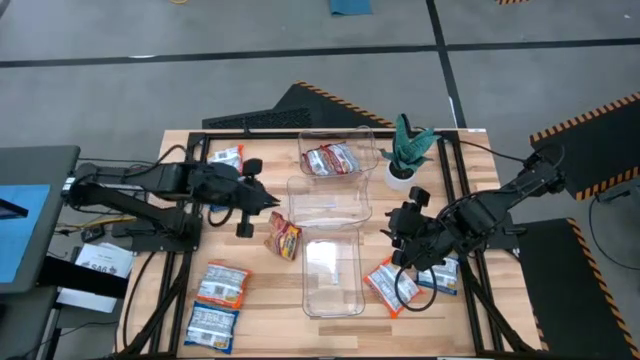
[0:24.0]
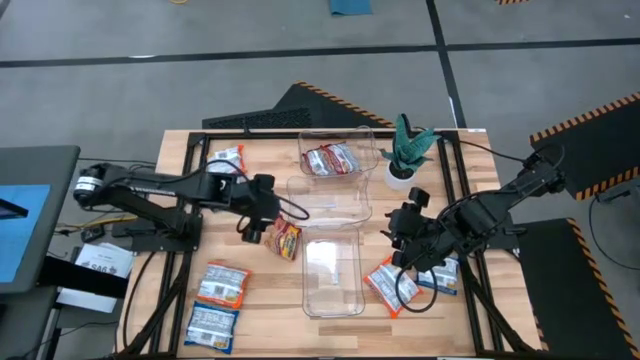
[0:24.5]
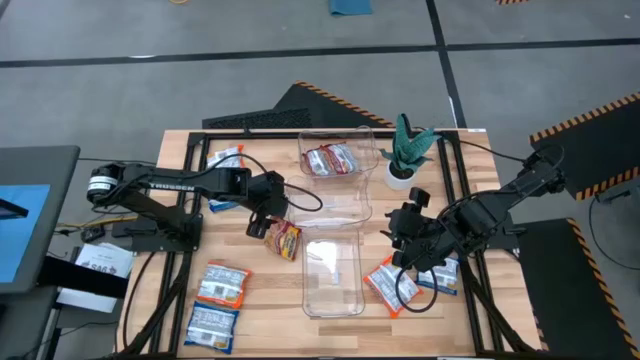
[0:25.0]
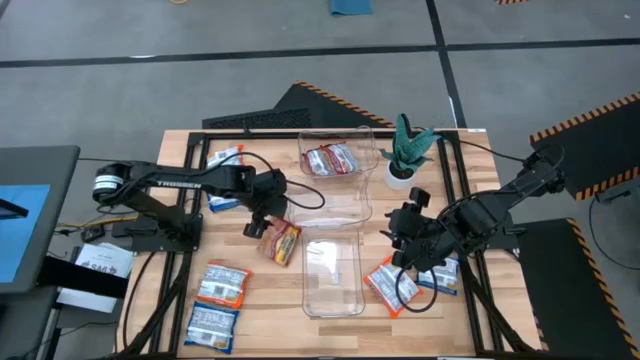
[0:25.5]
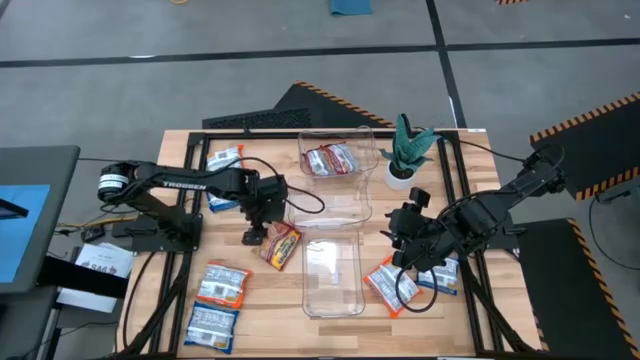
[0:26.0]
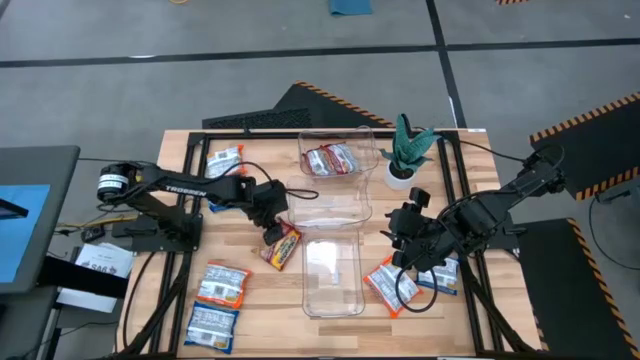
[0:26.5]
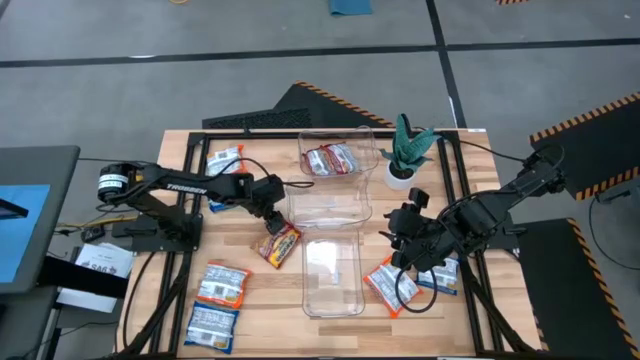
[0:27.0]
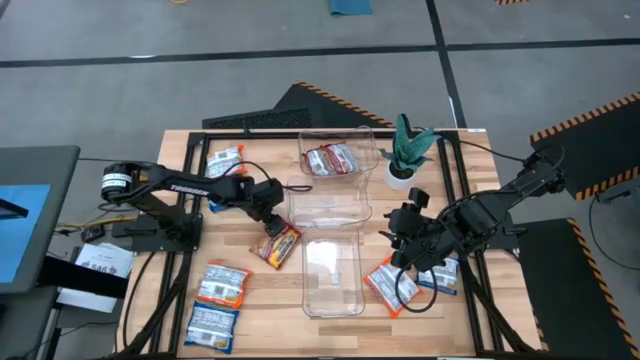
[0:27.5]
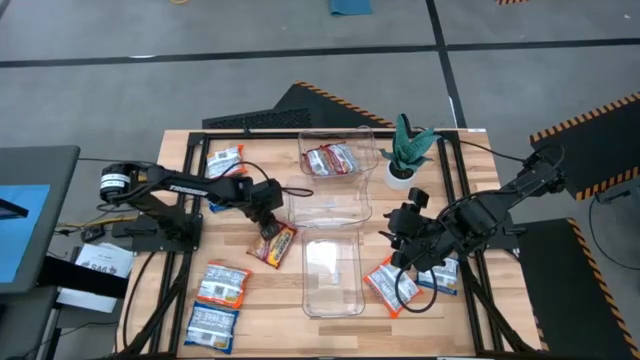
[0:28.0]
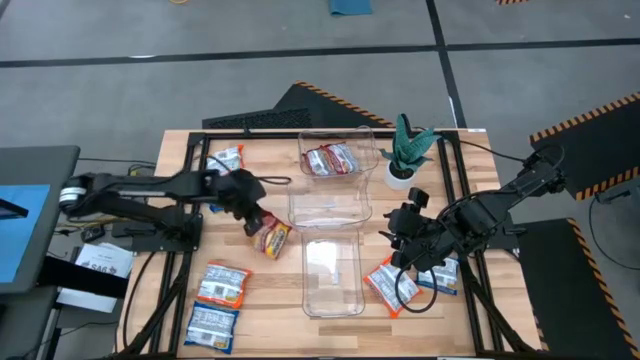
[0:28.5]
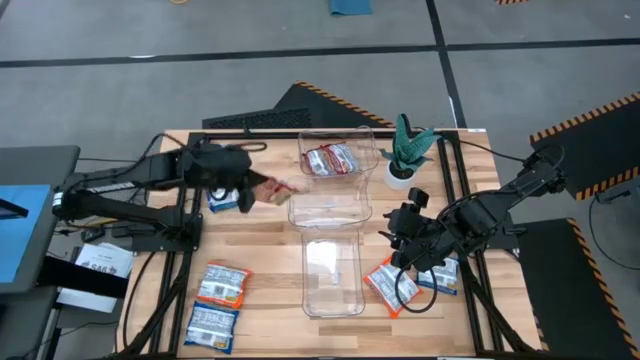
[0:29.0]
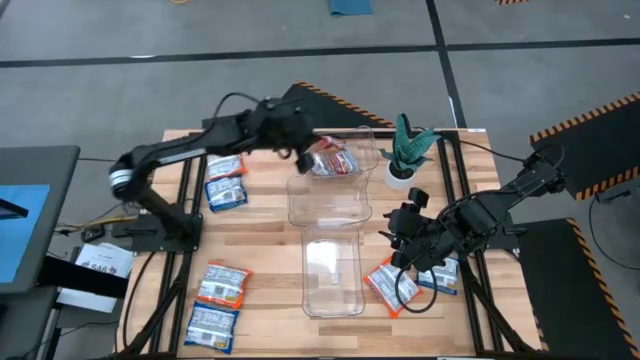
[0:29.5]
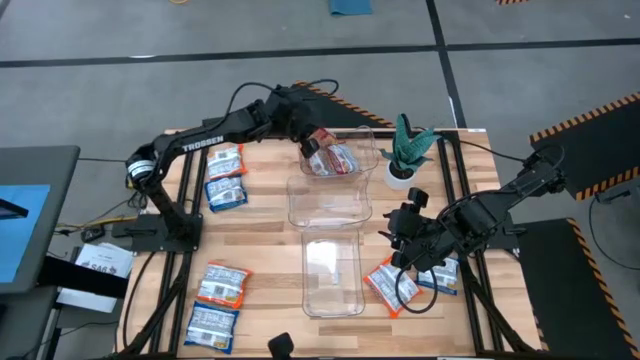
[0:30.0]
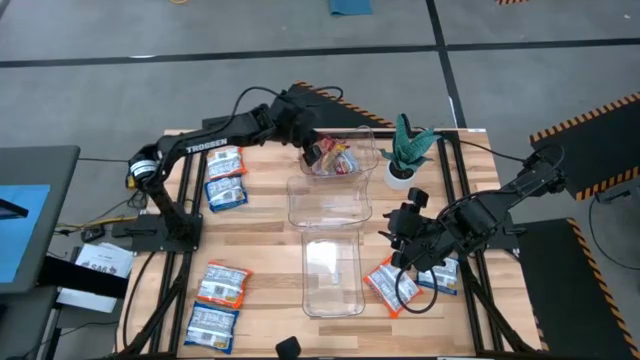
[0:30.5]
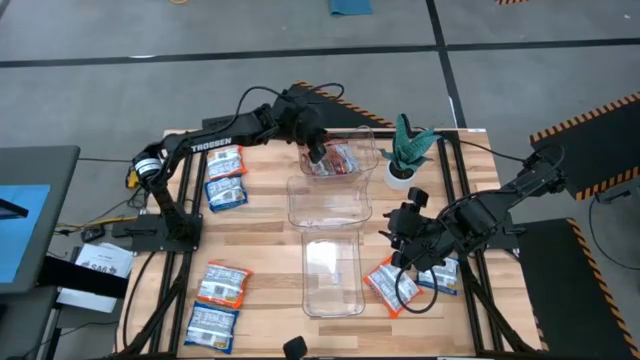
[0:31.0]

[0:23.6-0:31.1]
Task: Sort Maruchan noodles
Put the red noodle pack into the top transparent bin

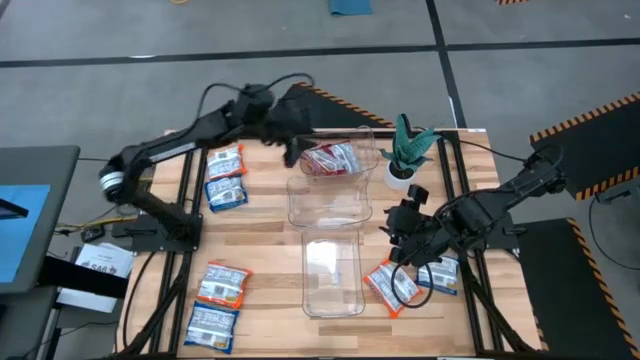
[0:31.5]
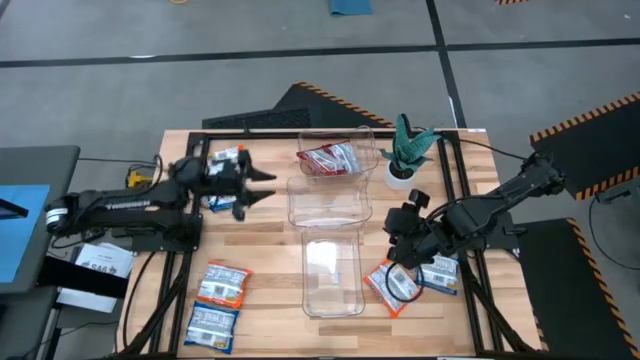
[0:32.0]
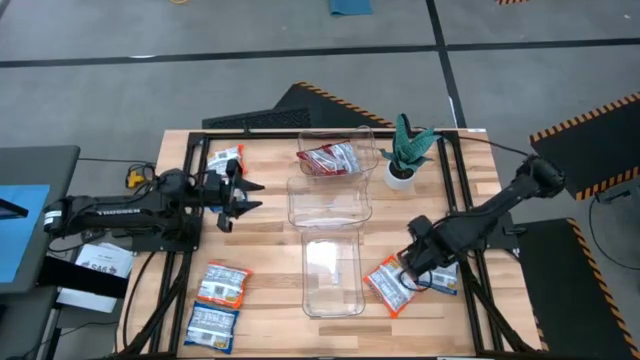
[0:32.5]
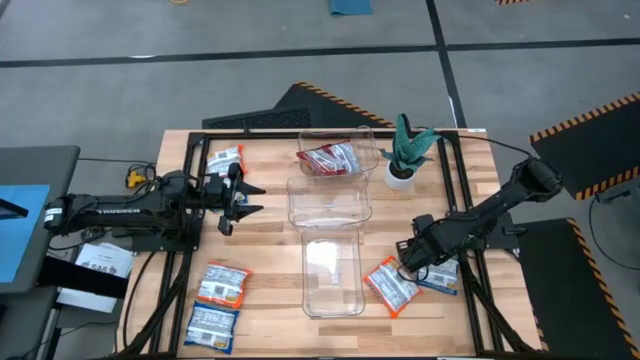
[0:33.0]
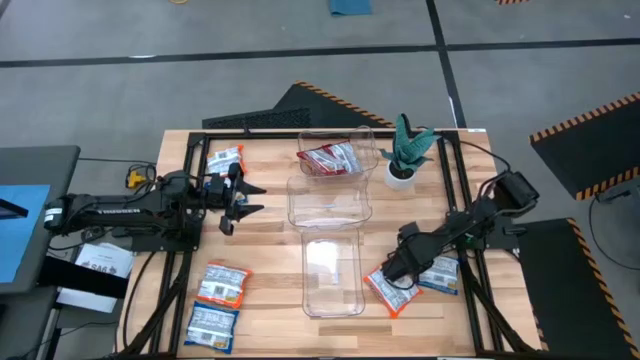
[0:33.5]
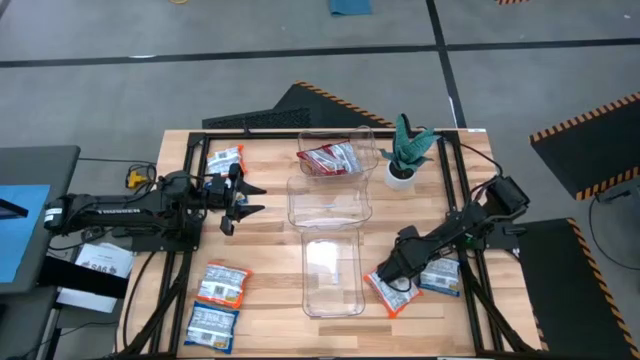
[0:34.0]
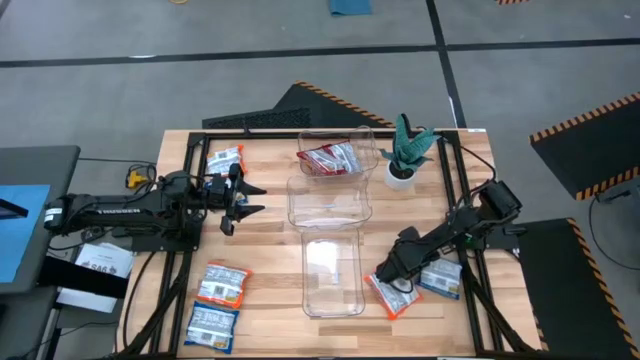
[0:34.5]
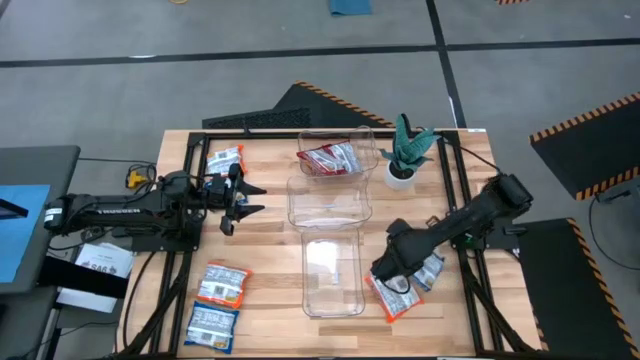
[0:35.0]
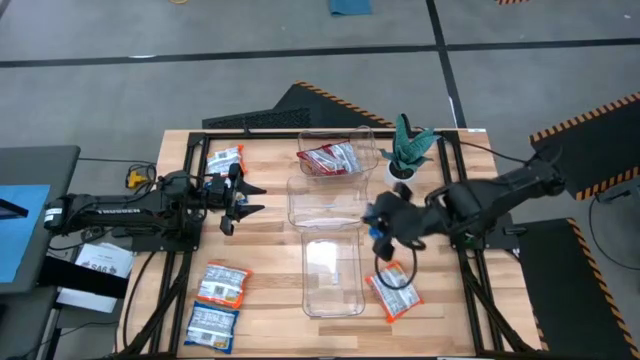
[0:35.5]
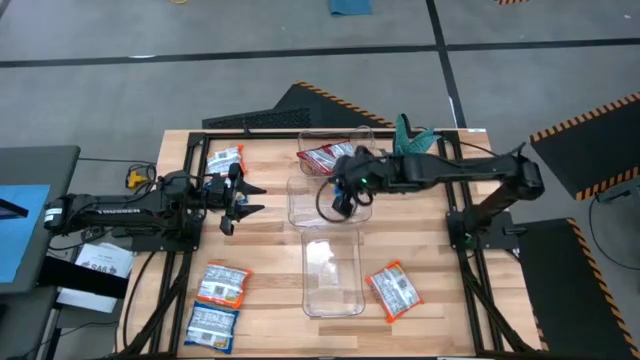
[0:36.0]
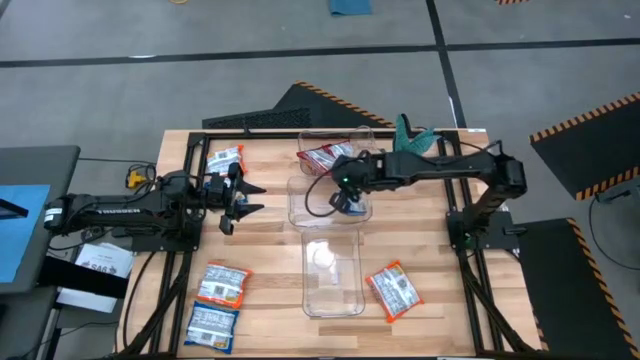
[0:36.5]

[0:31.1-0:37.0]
Put the bottom right blue noodle pack into the middle transparent bin

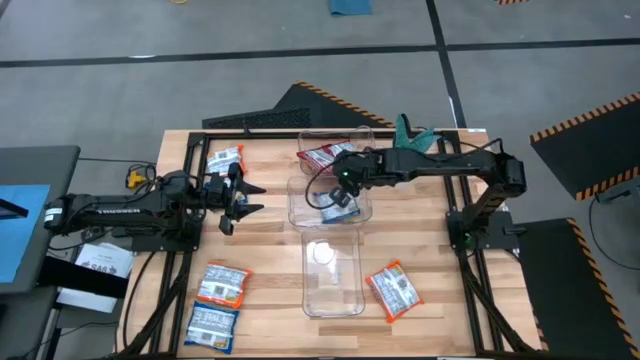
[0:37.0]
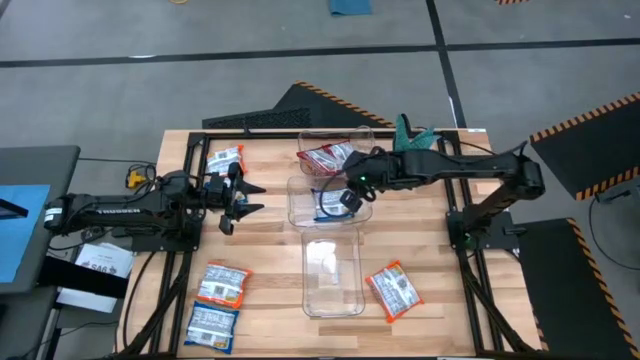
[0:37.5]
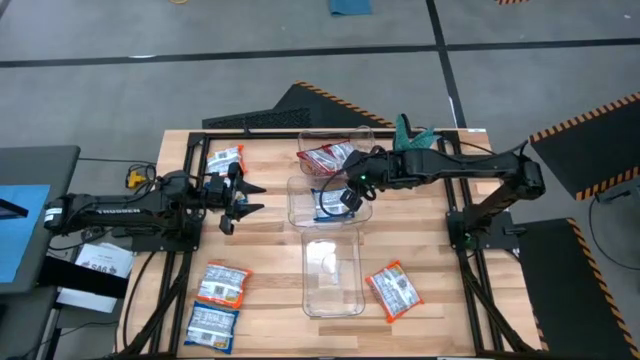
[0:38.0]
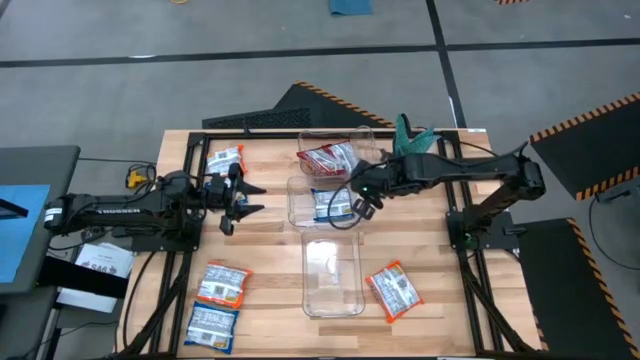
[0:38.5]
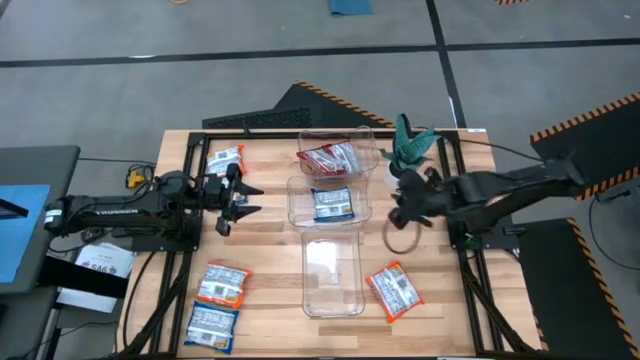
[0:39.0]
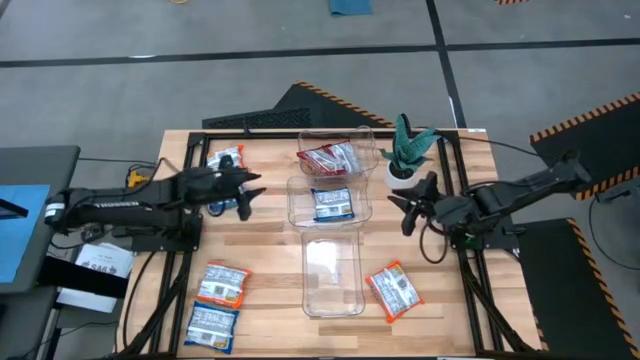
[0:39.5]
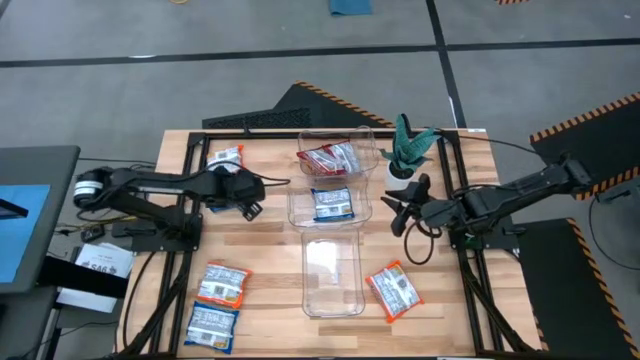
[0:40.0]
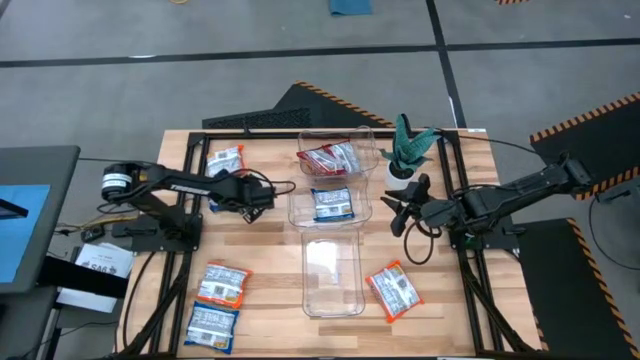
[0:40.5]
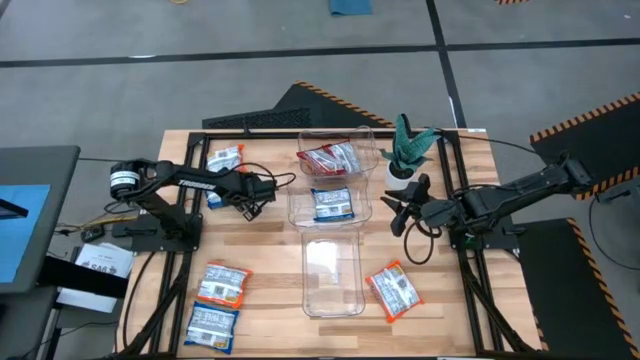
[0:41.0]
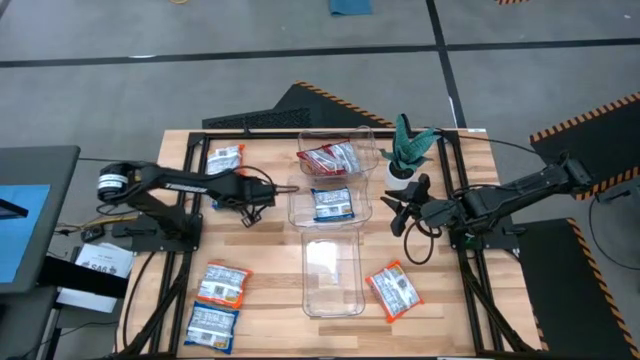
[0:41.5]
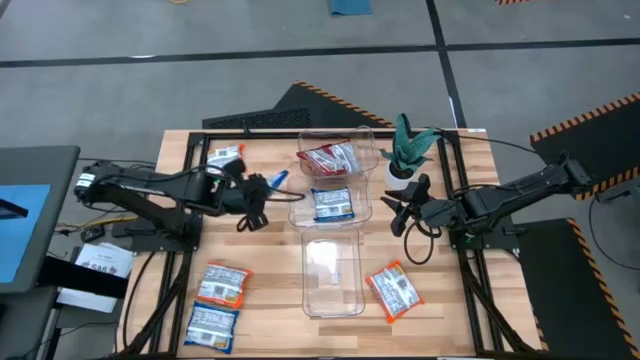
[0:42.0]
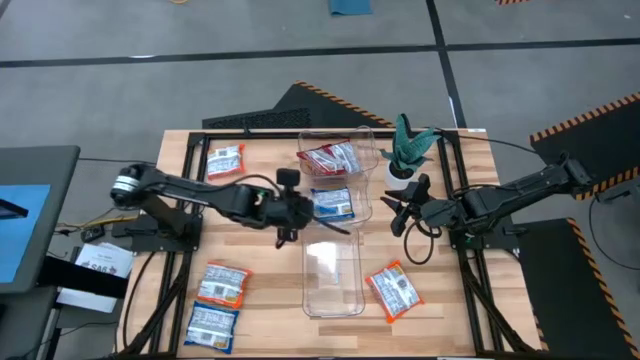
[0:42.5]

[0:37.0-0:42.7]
Put the top blue noodle pack into the middle transparent bin

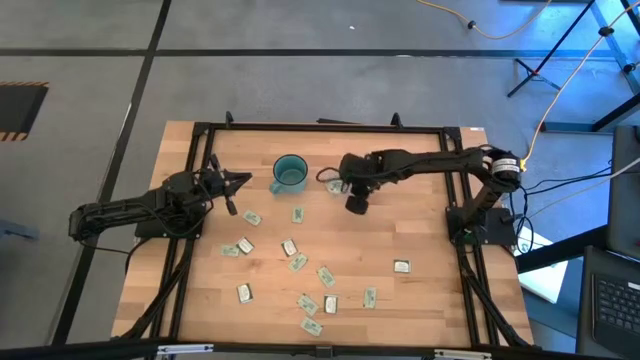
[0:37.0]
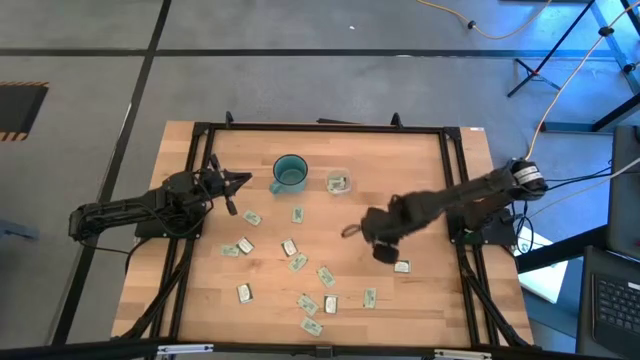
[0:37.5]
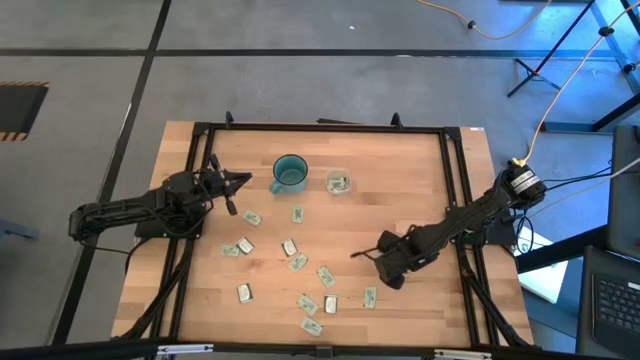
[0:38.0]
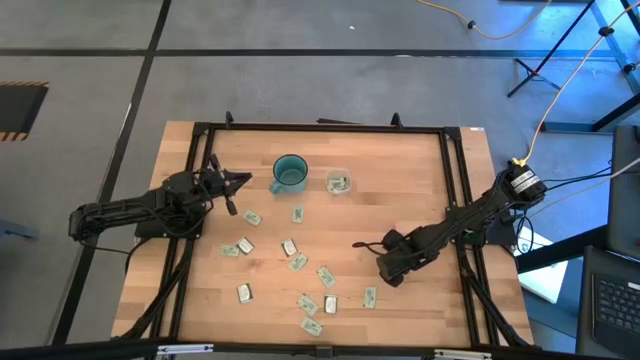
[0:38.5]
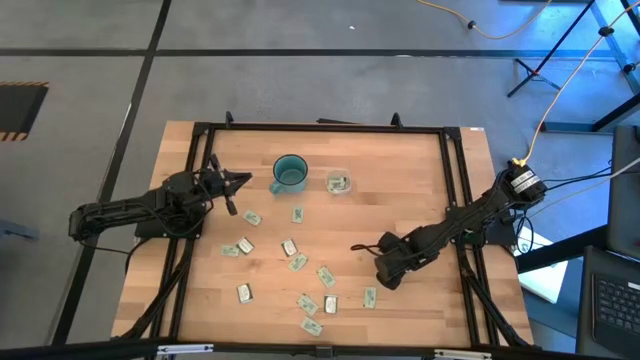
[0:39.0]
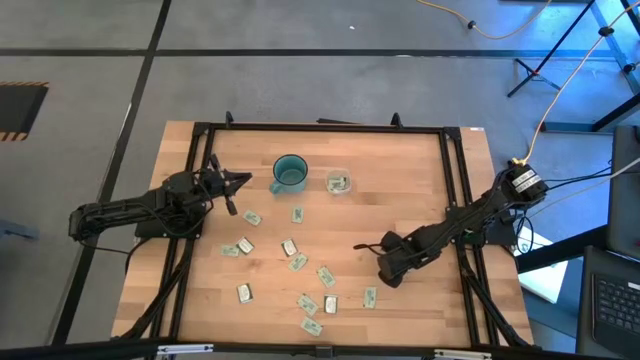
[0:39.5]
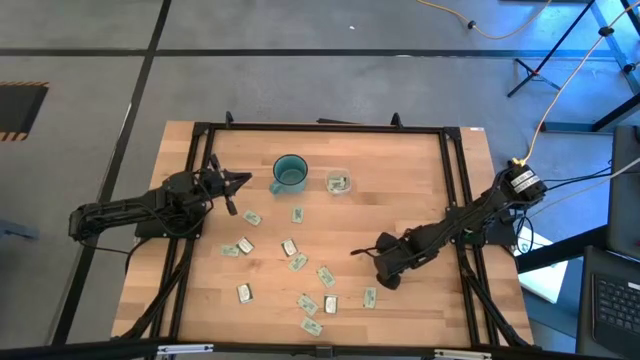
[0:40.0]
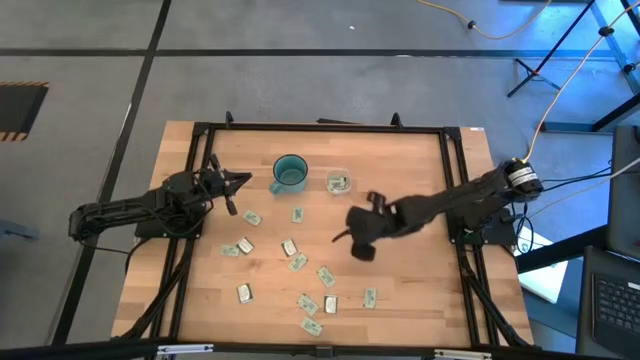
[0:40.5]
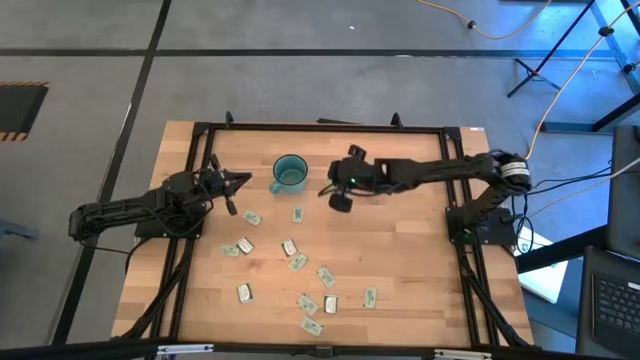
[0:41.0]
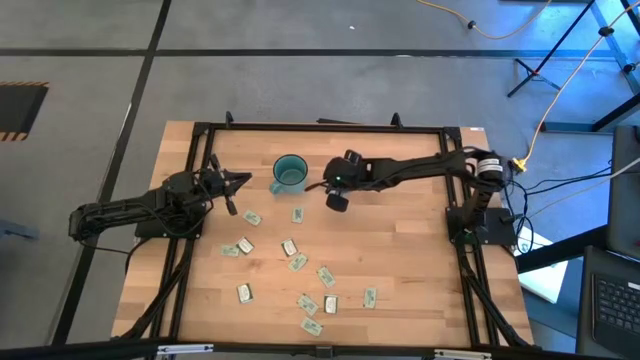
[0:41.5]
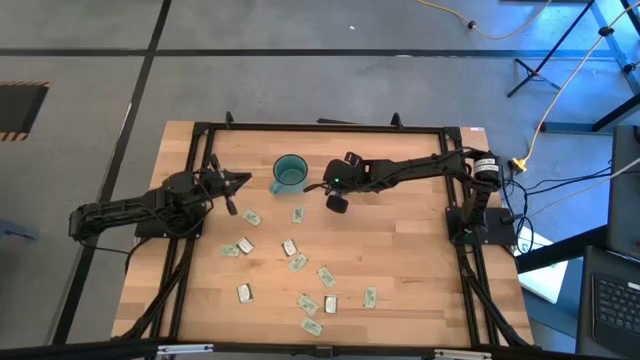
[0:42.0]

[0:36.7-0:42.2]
Task: Pick and place items into bin
Put the green stevia packet into the transparent bin
